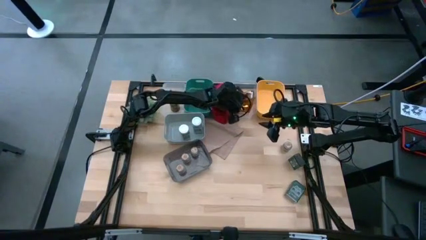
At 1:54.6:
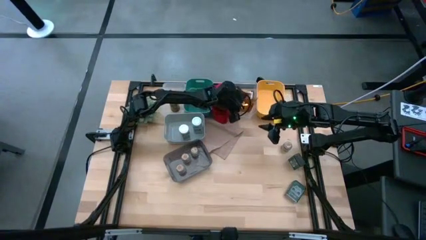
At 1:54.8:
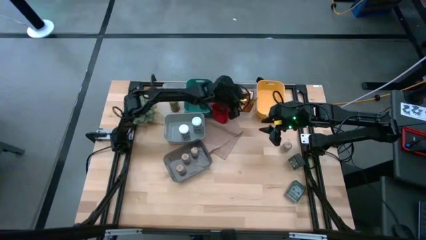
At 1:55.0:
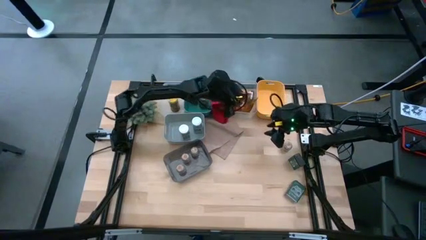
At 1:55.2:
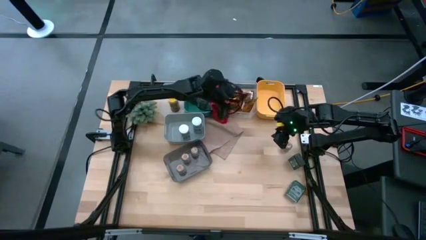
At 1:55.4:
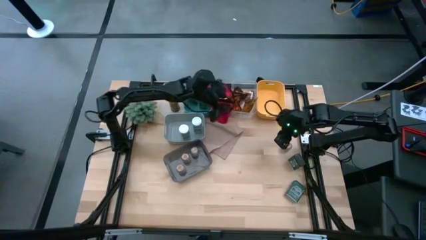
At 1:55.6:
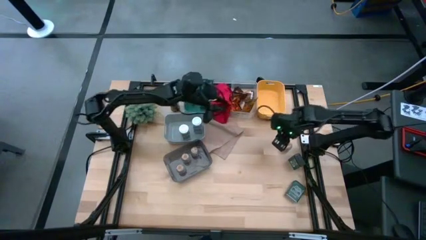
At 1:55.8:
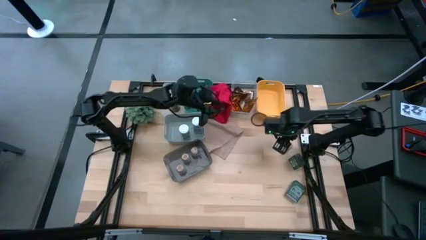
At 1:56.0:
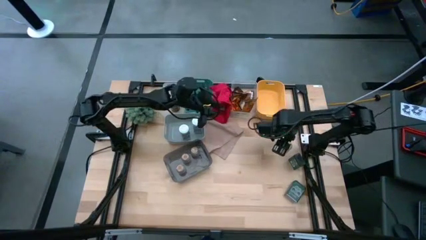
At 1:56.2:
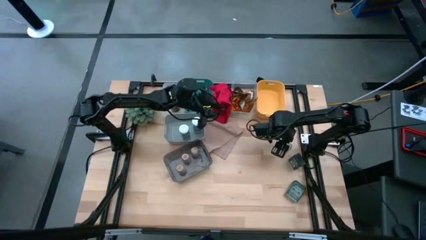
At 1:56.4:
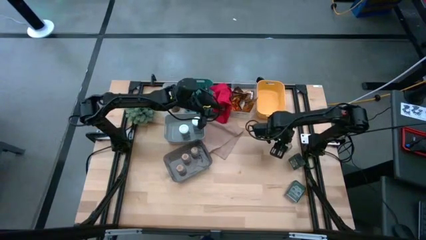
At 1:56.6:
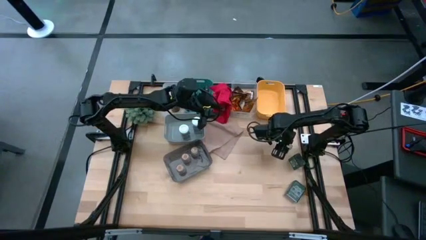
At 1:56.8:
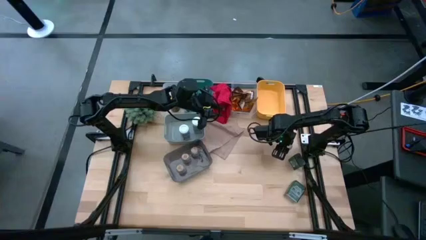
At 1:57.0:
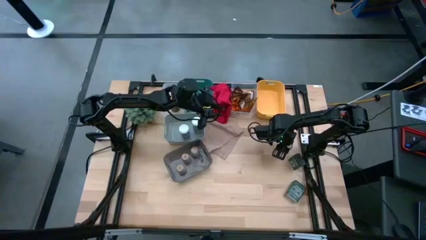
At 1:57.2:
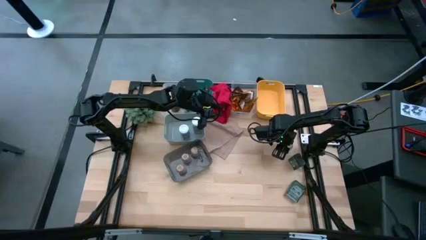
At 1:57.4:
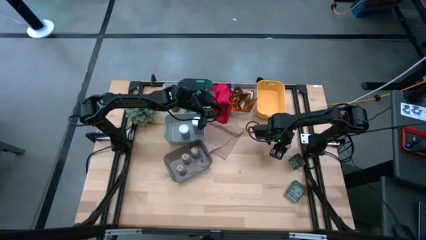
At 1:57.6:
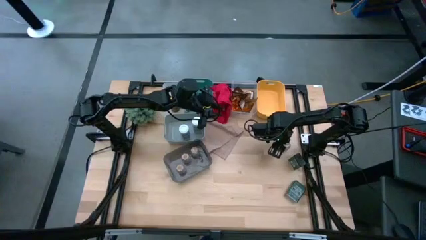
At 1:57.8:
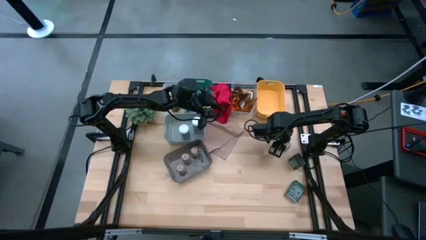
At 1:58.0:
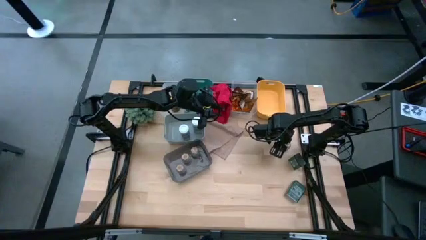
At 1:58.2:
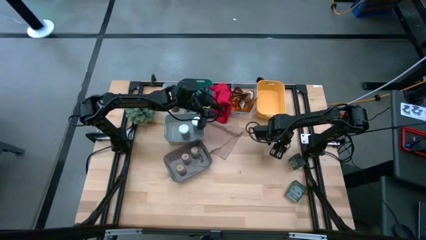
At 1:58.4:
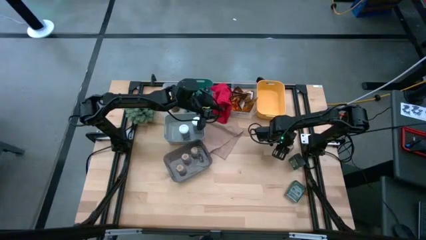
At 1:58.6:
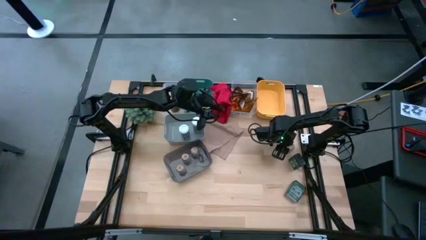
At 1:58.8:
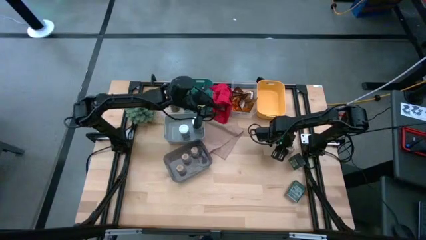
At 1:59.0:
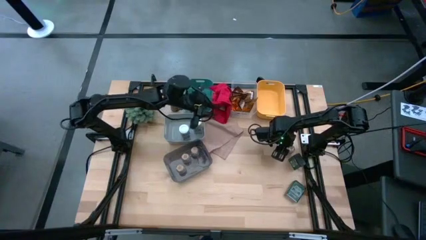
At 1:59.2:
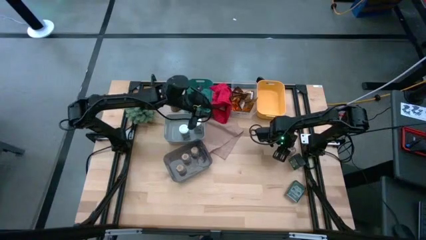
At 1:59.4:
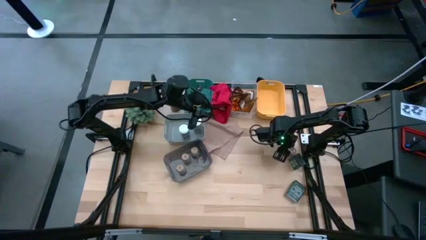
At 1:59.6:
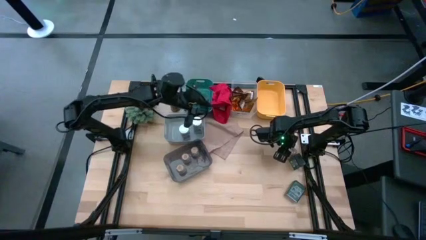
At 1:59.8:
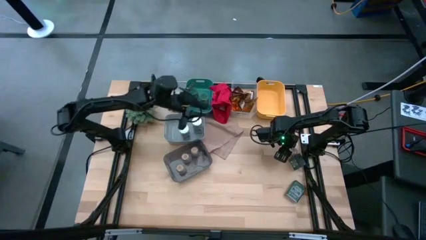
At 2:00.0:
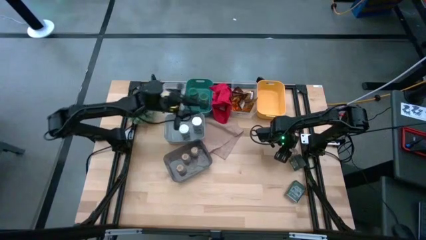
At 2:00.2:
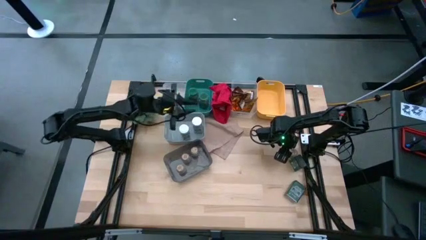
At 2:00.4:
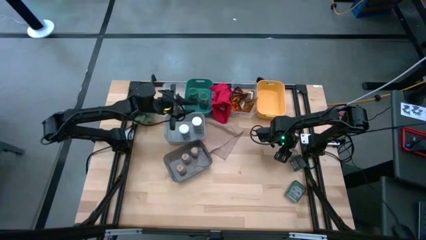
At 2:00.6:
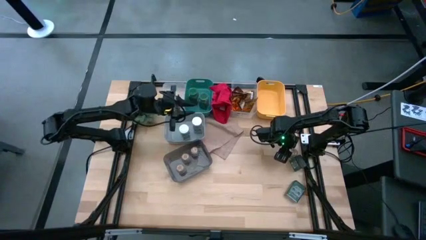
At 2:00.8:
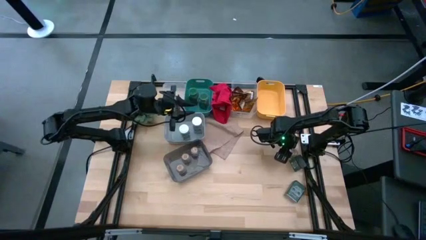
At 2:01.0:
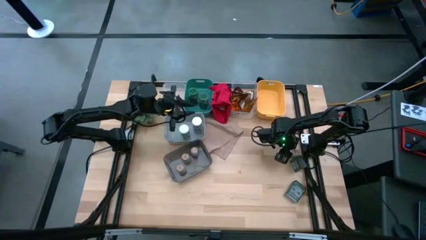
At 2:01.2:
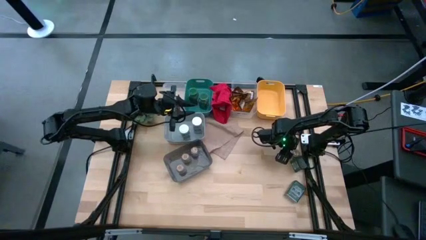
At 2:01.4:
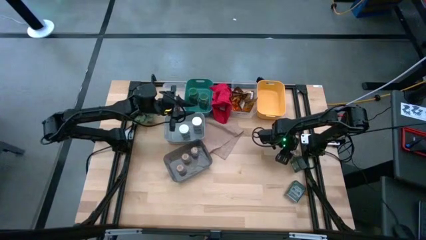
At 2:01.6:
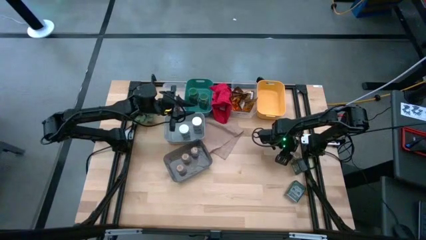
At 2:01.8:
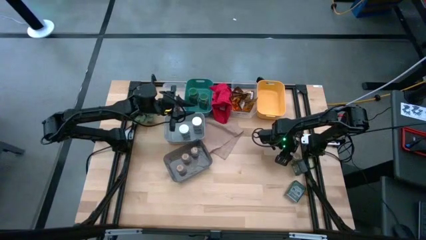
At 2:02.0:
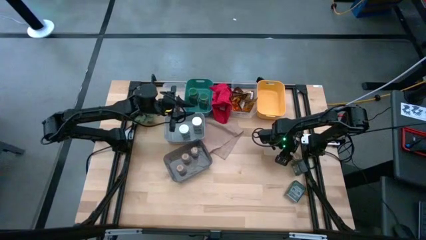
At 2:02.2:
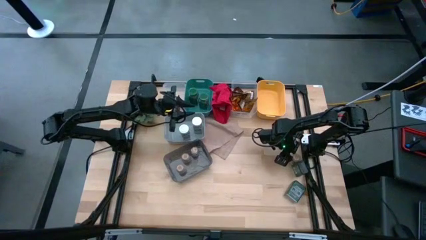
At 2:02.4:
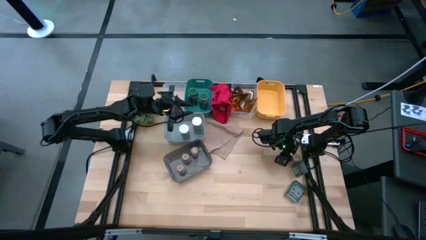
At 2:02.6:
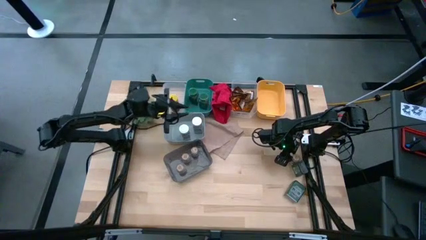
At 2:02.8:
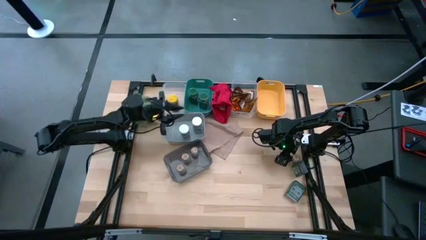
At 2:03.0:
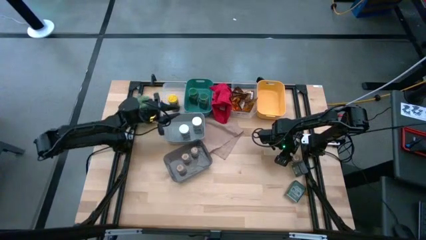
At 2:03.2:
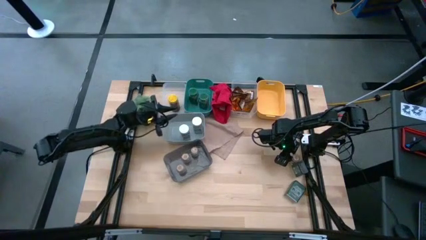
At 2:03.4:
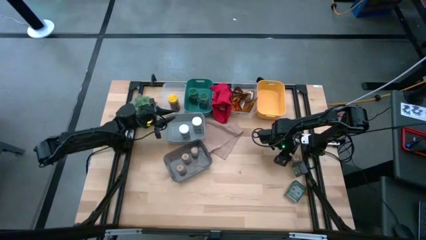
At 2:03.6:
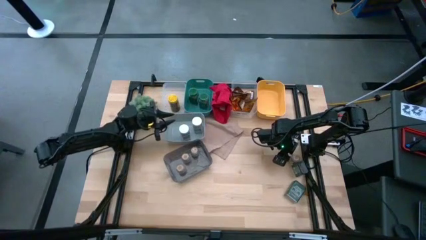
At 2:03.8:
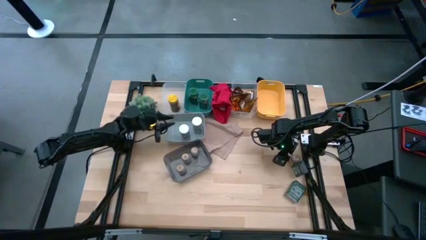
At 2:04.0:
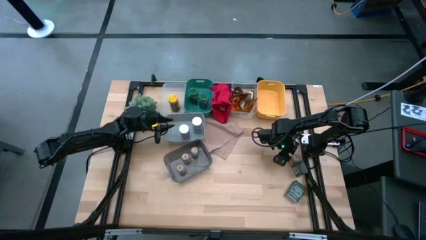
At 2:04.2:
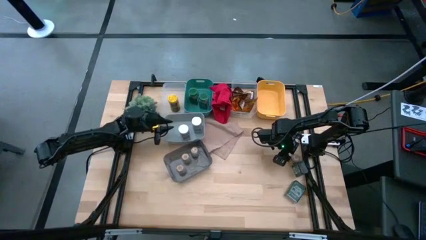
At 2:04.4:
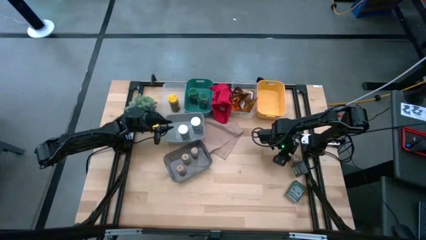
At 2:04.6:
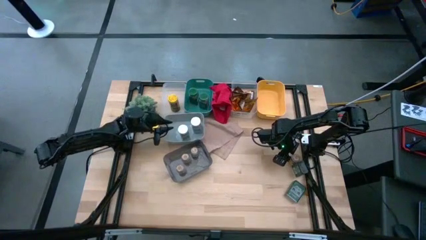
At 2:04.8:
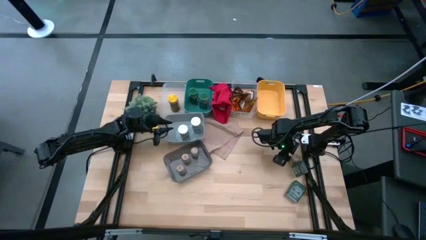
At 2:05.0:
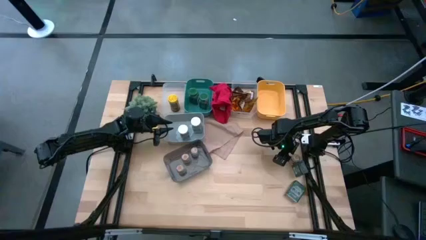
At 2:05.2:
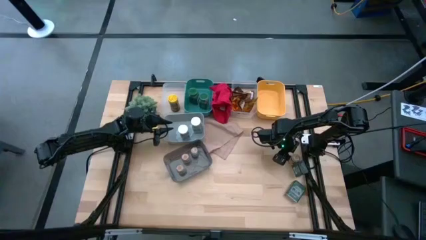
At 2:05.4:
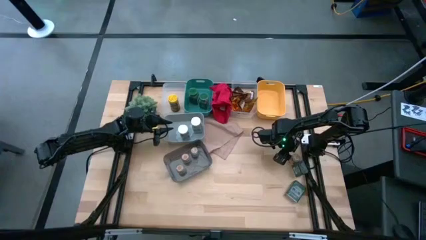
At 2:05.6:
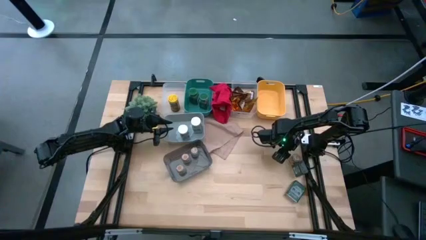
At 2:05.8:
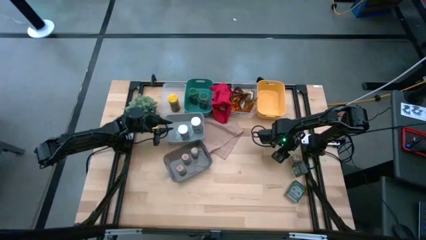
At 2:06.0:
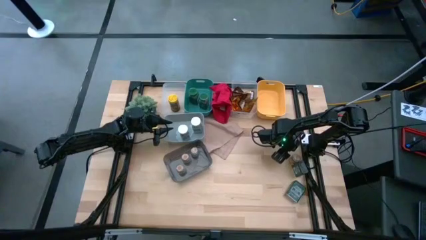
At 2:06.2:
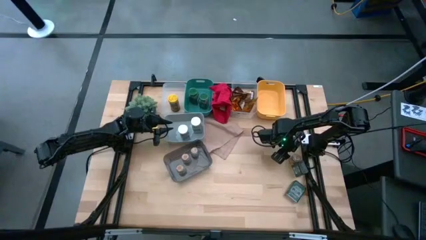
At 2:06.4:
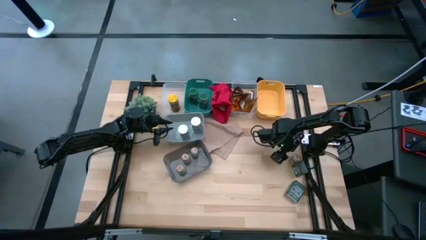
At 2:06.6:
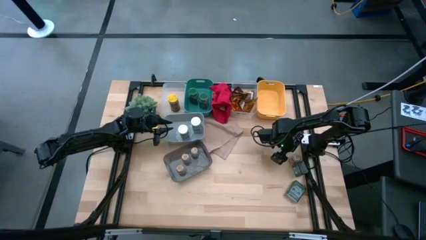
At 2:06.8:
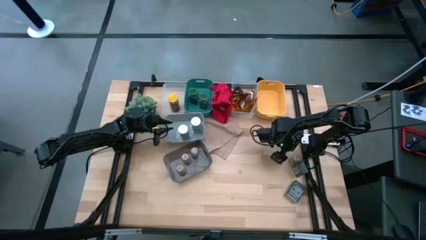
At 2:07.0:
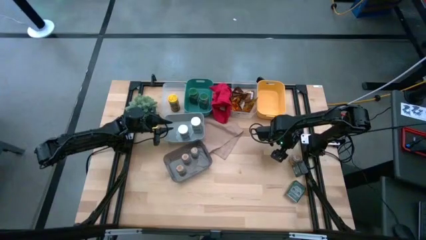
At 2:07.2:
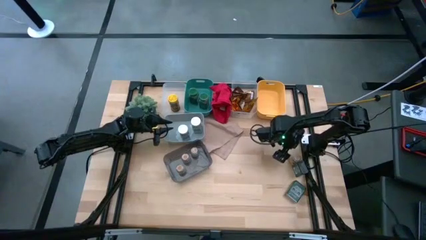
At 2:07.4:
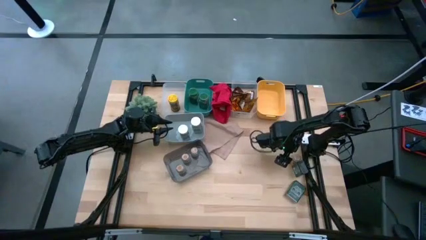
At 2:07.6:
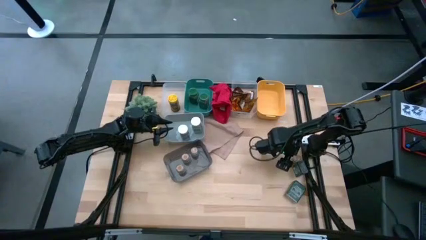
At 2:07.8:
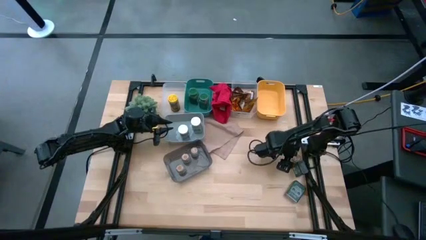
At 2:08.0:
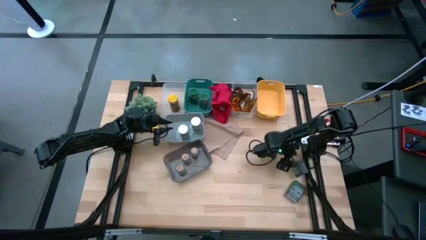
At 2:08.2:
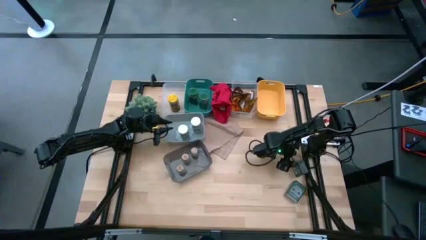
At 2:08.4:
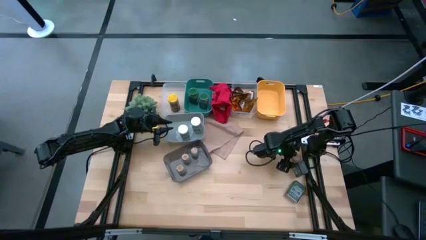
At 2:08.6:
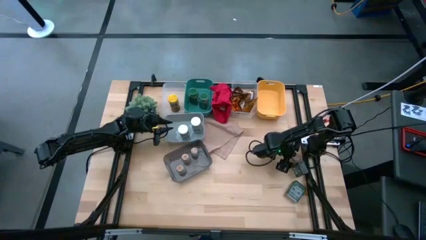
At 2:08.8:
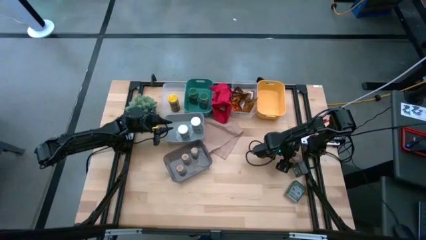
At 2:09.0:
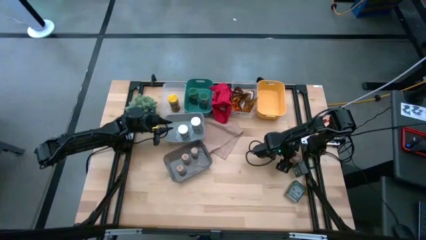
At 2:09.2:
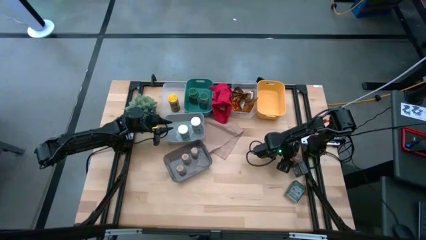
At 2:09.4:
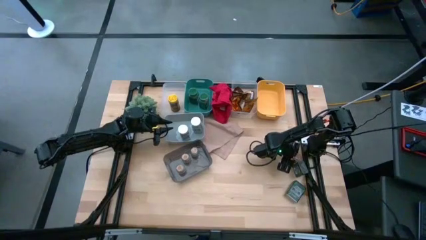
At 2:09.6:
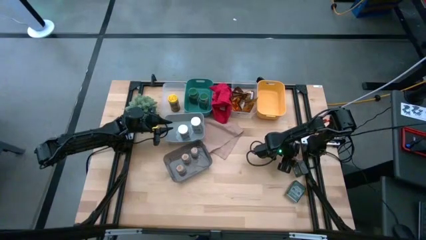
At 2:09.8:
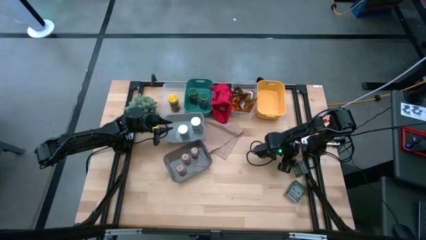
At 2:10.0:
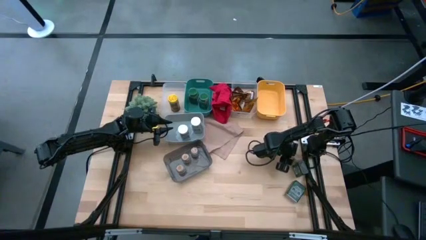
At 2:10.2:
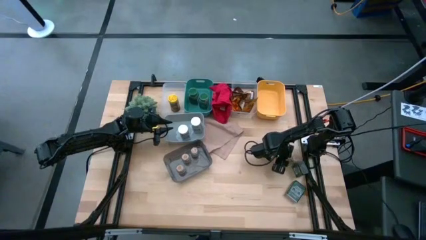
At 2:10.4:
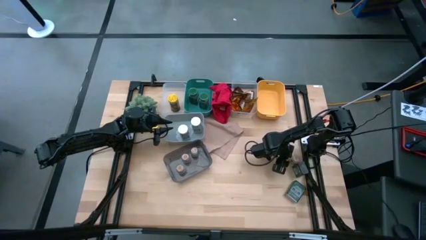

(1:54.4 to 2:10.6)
Task: Sort spices by type
Put the brown seasoning bottle into the black bin
